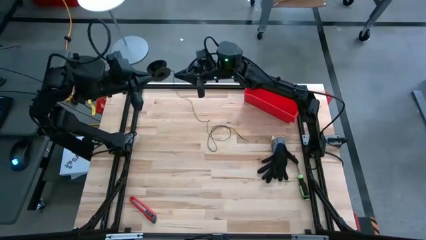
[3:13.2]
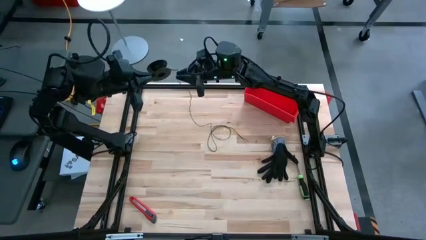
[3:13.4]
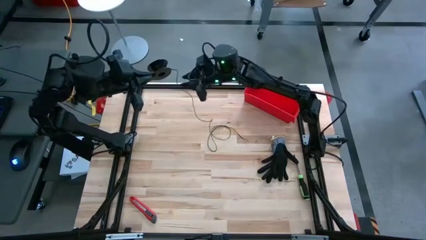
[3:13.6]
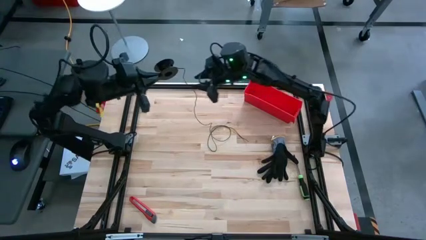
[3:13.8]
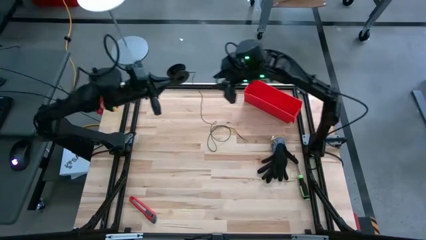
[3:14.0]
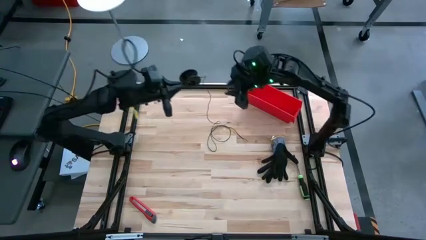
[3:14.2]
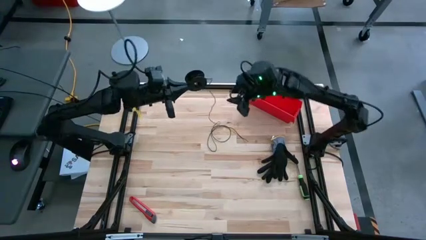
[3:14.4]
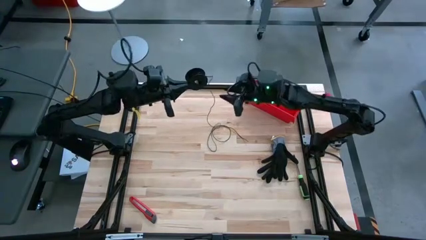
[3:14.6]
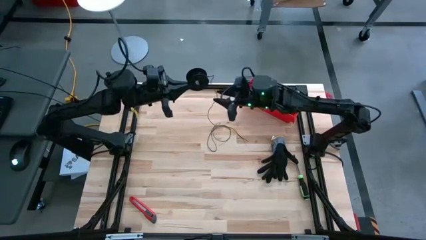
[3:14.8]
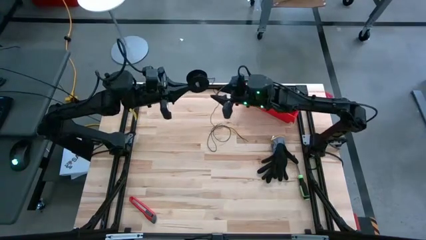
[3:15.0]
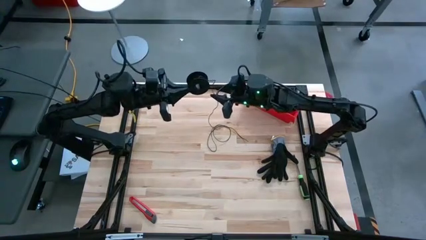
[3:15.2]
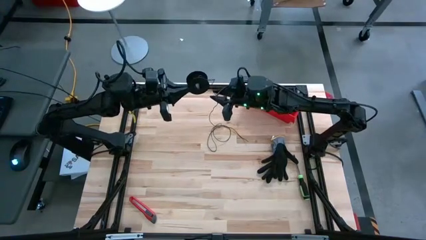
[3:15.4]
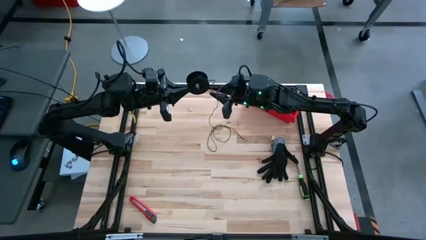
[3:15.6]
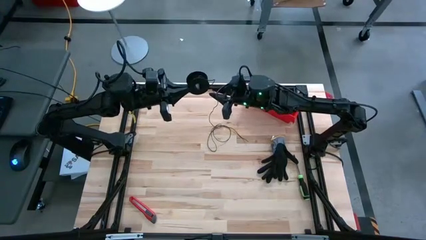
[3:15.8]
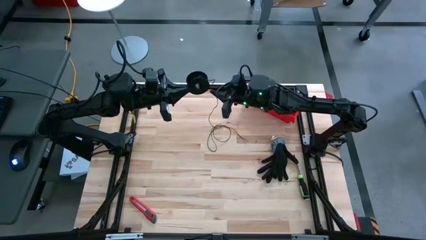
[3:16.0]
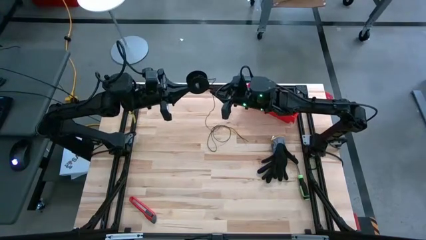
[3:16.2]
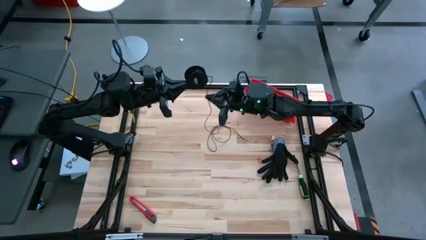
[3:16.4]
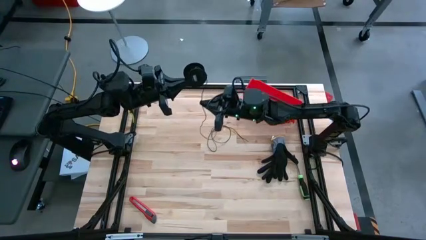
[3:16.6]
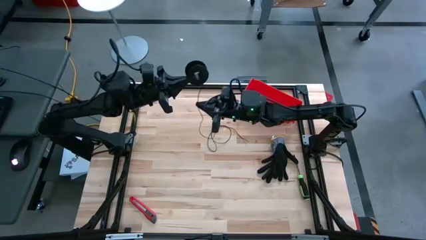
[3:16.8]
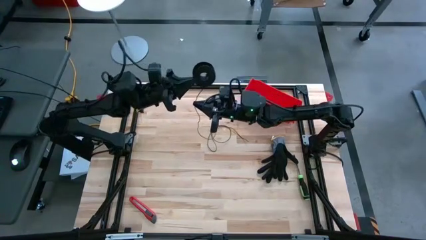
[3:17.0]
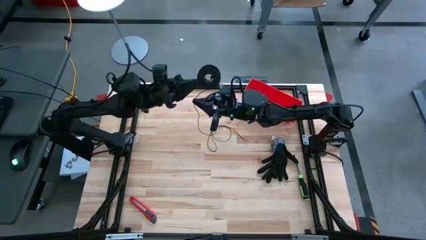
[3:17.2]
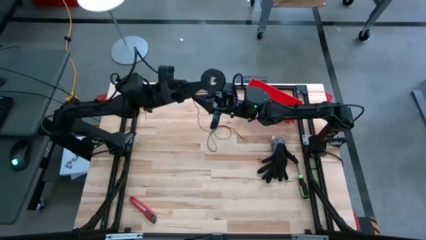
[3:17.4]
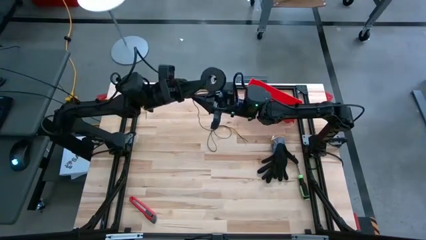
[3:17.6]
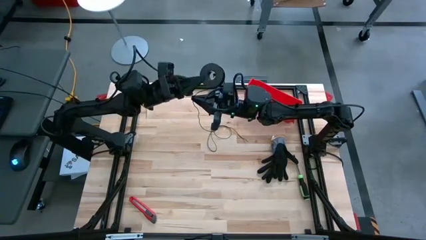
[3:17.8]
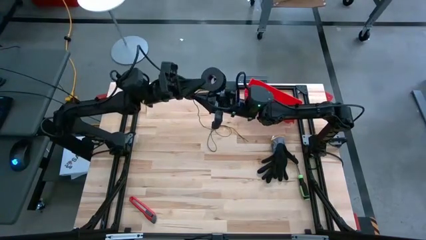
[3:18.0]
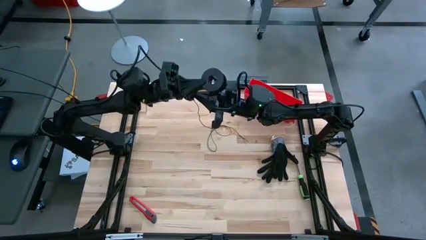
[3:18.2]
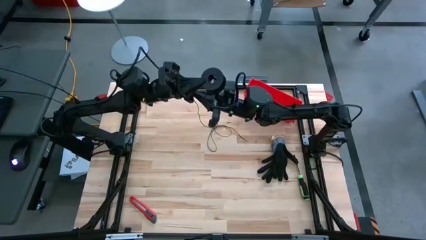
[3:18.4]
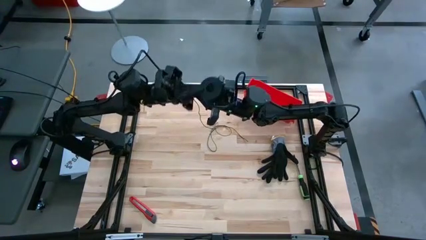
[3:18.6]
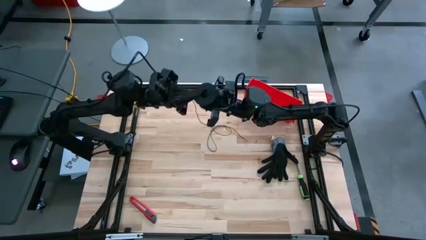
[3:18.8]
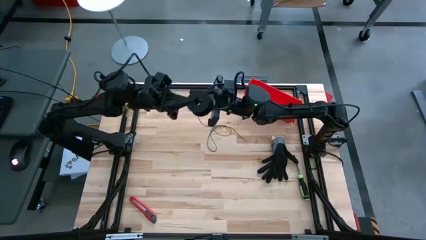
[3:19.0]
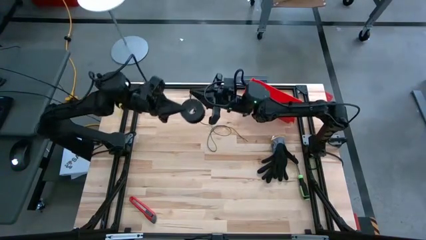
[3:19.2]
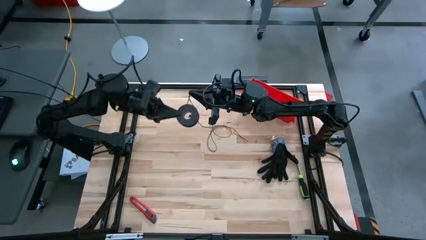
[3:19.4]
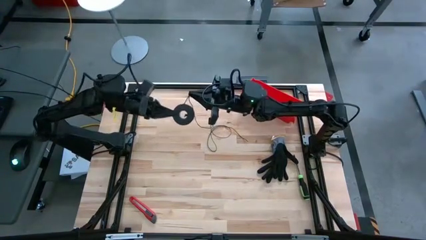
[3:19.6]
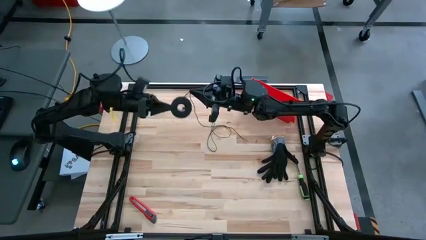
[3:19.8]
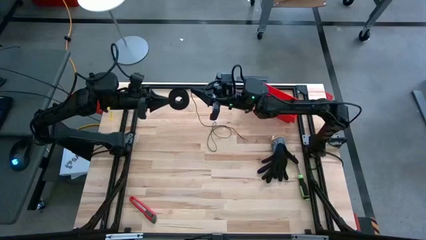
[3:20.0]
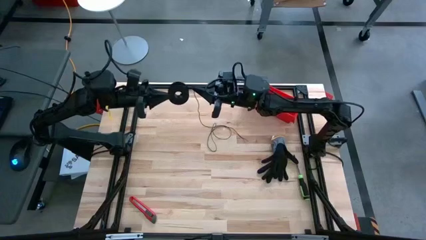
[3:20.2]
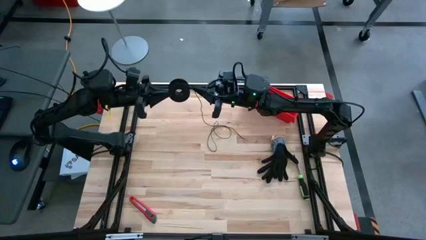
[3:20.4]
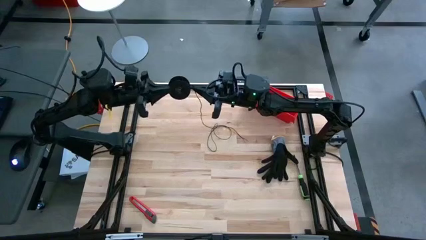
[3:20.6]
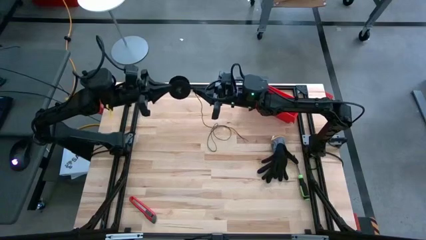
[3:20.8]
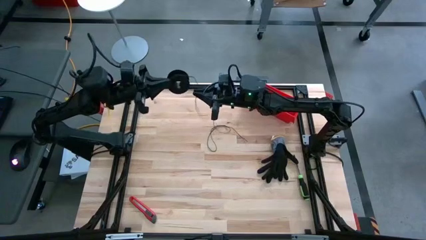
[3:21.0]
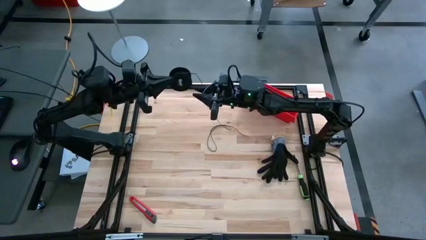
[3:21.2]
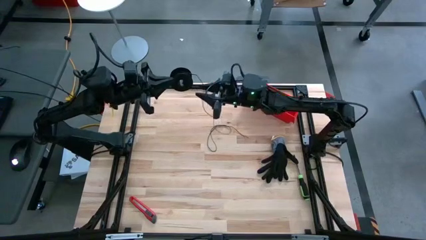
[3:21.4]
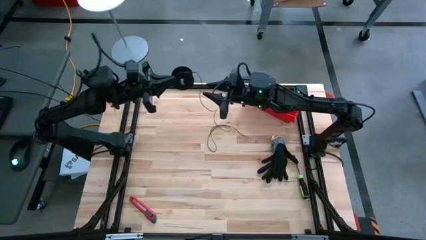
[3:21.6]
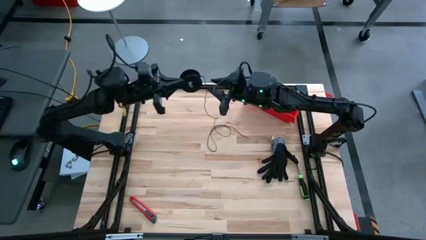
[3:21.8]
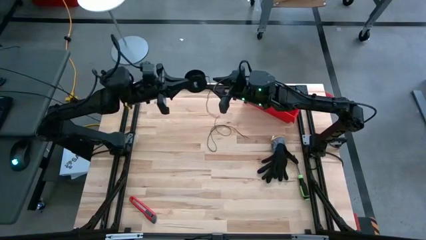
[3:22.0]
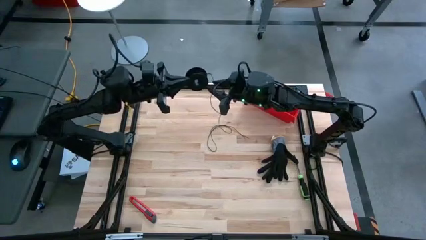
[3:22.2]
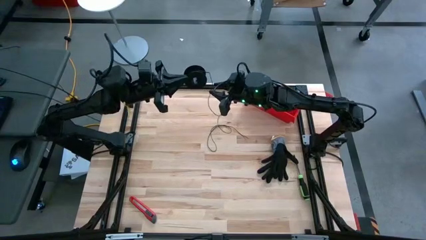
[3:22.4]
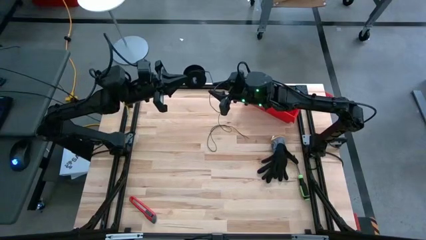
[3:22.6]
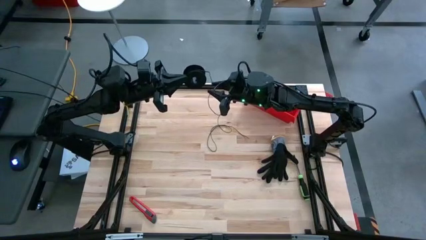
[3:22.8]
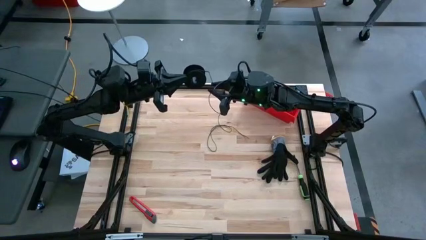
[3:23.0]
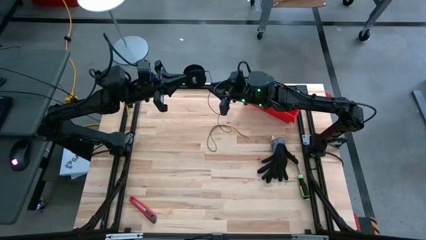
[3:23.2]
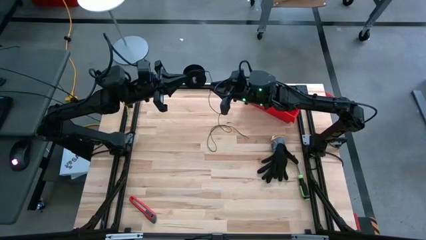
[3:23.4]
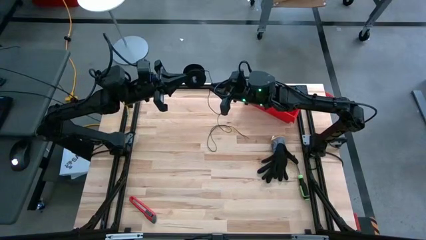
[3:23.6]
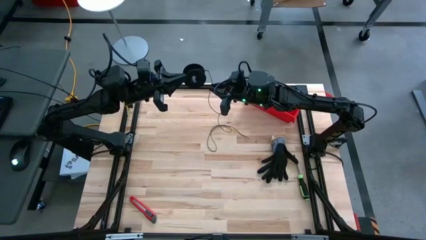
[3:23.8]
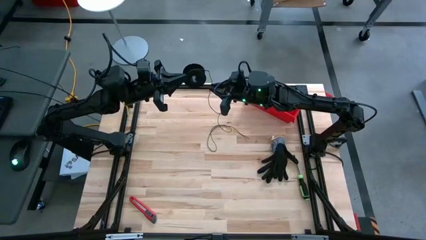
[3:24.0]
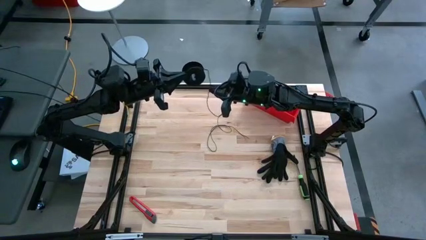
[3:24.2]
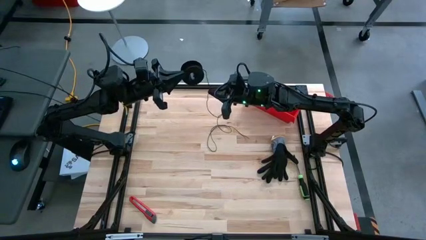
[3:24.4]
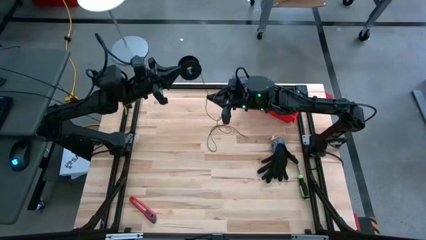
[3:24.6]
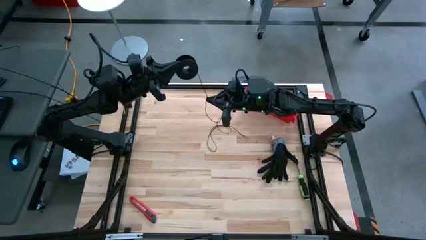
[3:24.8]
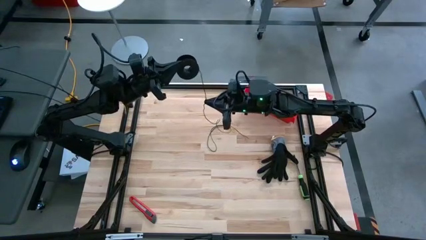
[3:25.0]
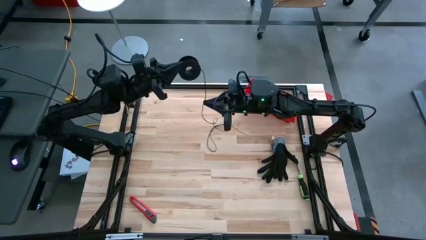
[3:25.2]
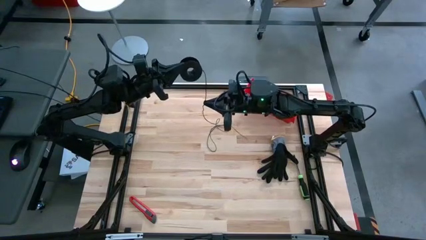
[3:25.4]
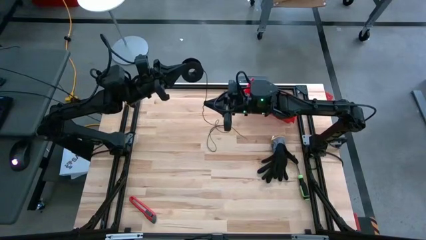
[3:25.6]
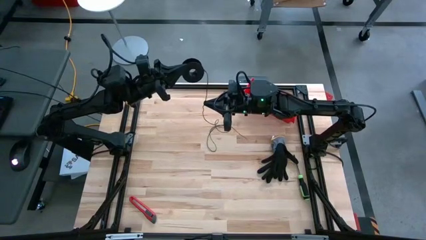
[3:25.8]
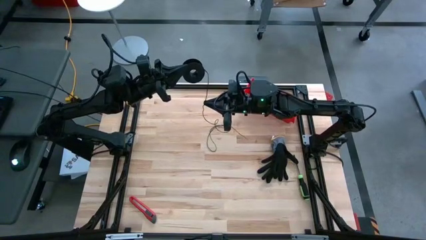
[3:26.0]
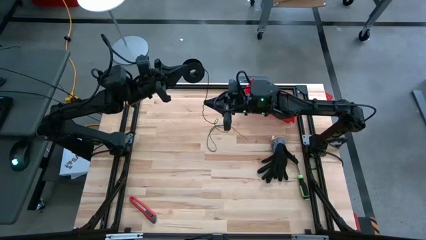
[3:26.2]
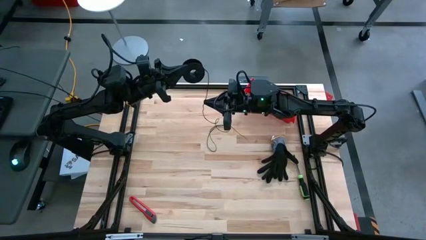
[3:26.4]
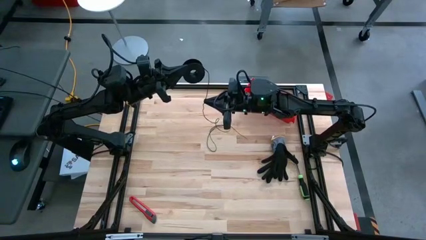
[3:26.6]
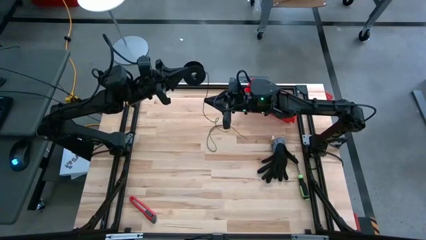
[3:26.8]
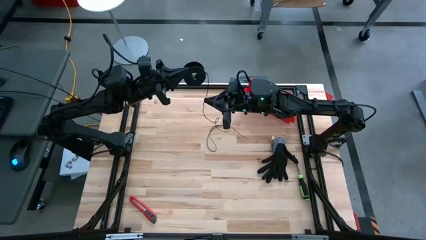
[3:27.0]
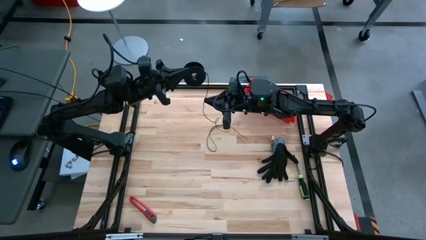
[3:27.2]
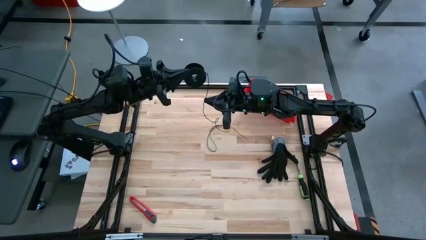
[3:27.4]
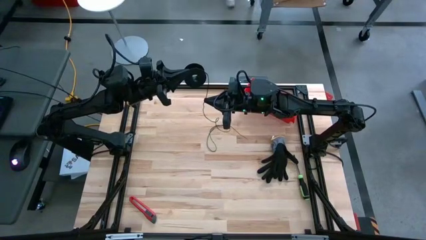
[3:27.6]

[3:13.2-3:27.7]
Task: Coil cords
Coil the black wire on the spool

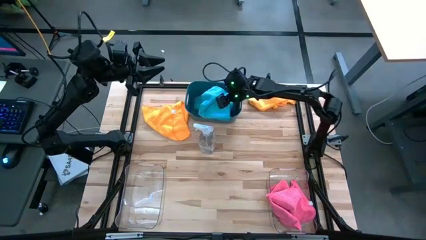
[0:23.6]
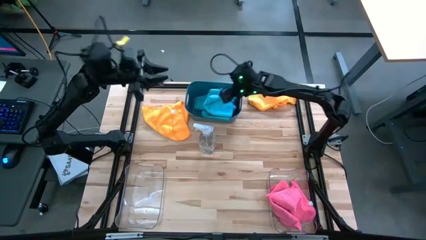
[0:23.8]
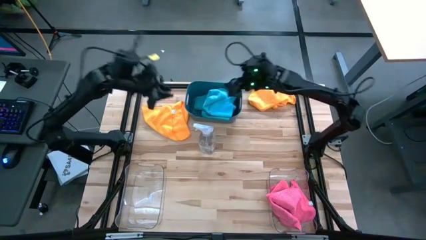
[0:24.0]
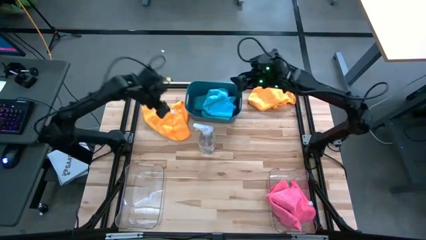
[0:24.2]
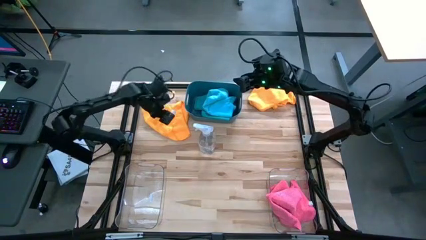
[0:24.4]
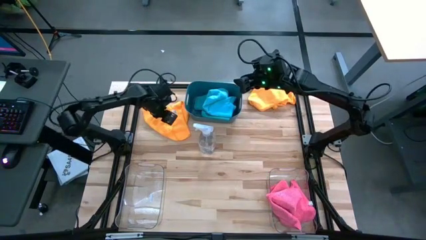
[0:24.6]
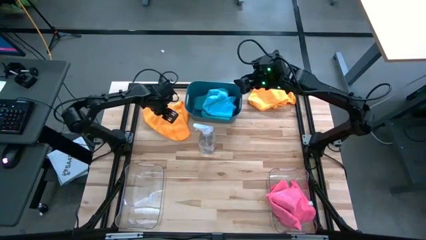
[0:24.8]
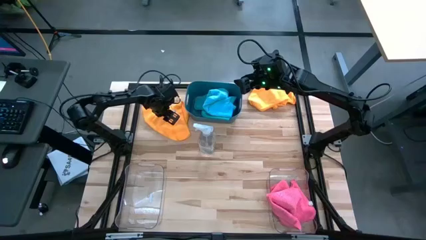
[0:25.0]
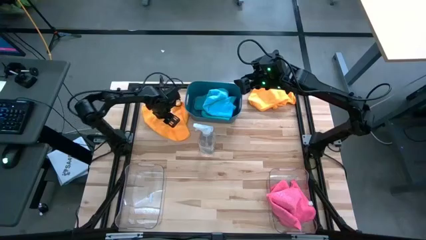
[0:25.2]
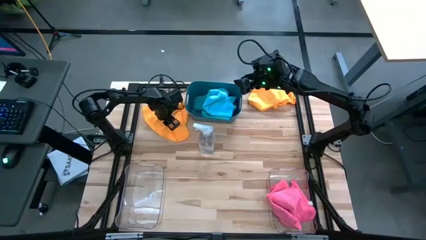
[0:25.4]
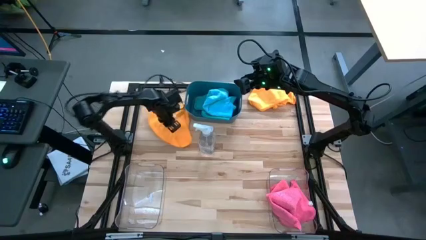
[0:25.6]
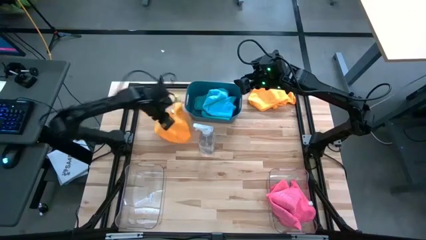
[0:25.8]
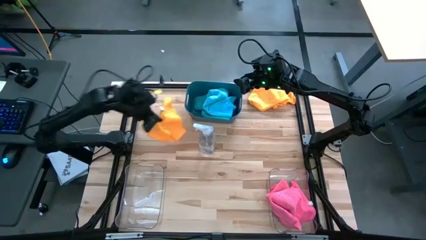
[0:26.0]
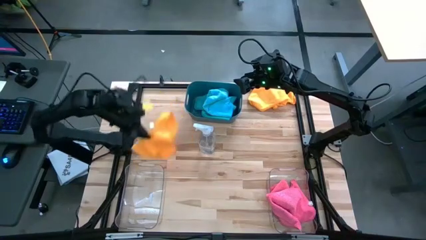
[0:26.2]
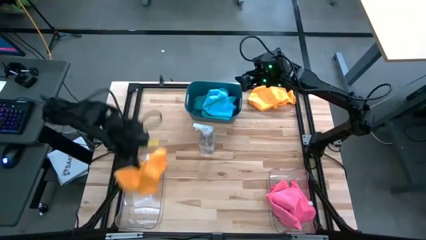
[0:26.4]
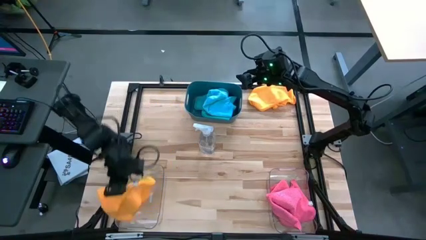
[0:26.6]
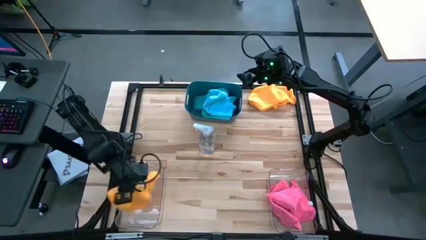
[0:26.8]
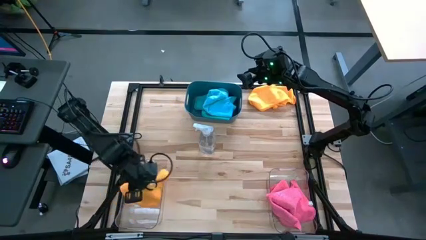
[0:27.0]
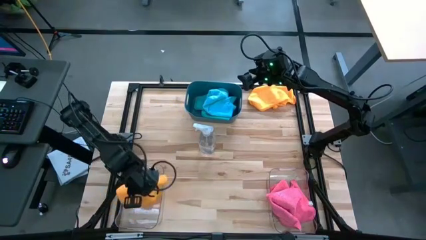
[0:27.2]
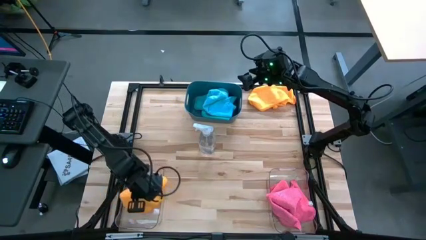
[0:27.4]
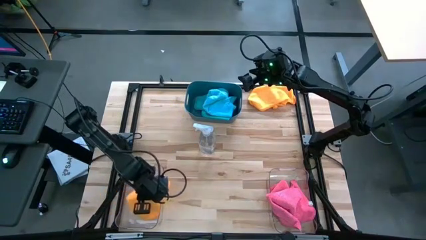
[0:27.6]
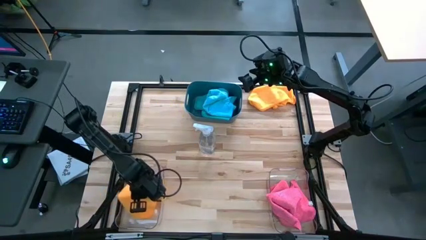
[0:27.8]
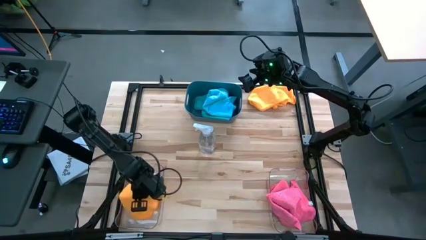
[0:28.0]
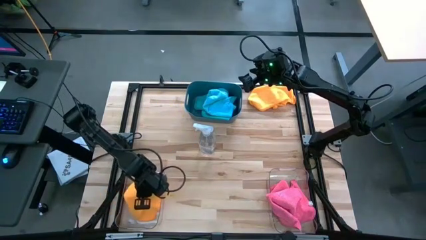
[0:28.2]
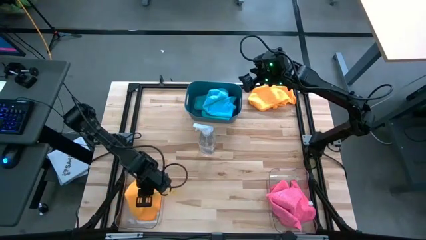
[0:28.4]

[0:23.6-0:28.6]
Task: Sort microfiber towel by color & place in baskets
Put the left orange microfiber towel into the left transparent bin
